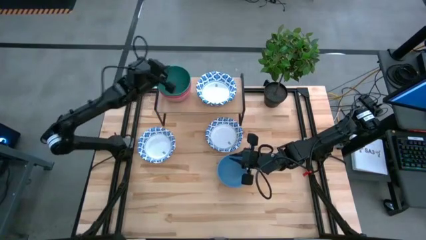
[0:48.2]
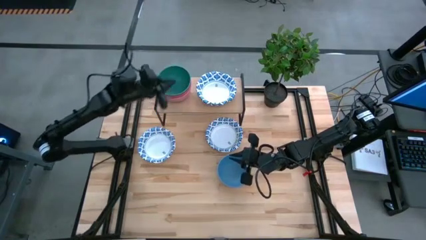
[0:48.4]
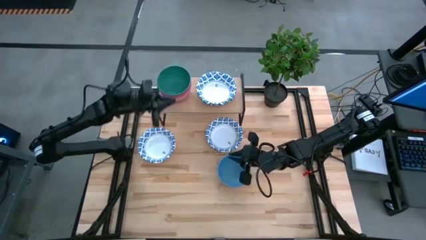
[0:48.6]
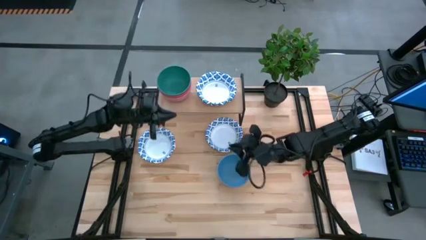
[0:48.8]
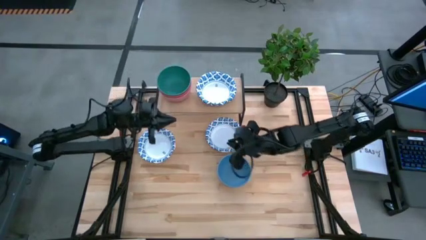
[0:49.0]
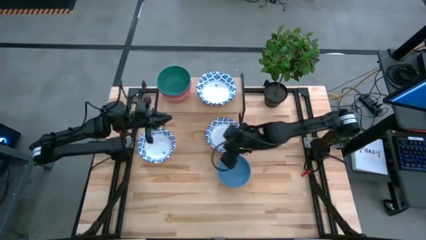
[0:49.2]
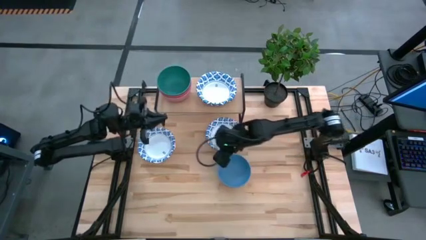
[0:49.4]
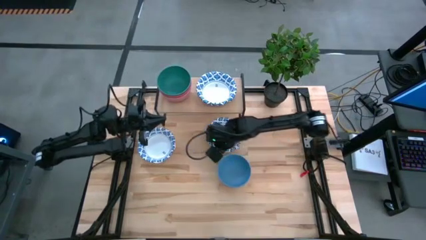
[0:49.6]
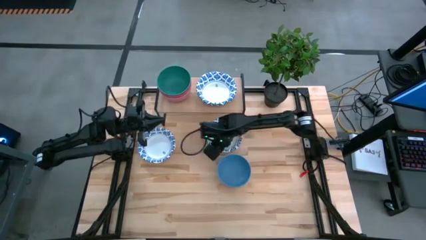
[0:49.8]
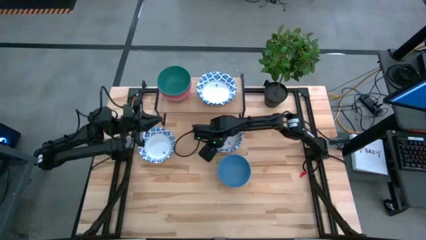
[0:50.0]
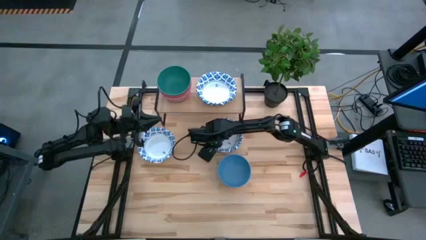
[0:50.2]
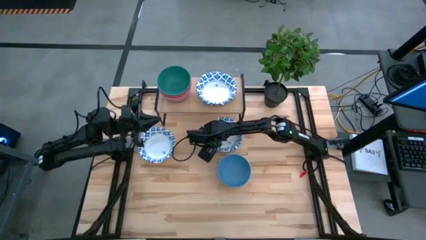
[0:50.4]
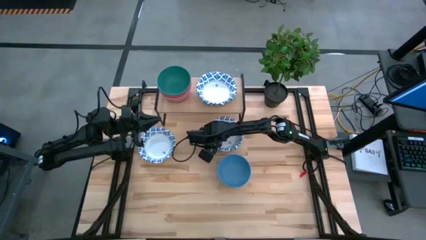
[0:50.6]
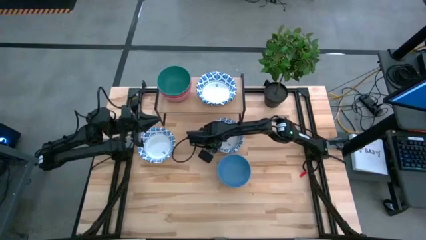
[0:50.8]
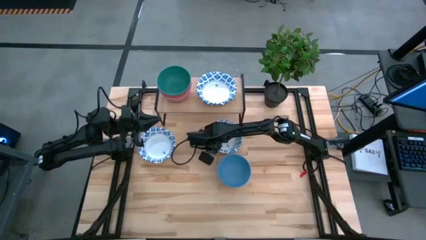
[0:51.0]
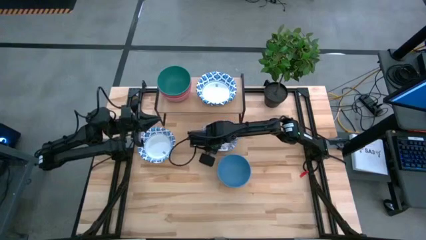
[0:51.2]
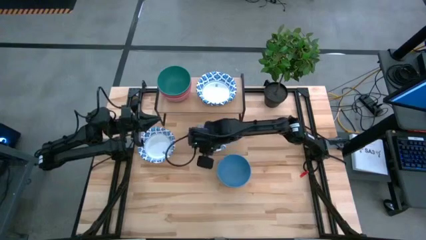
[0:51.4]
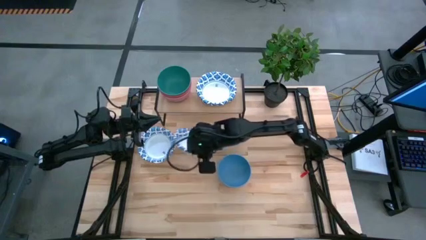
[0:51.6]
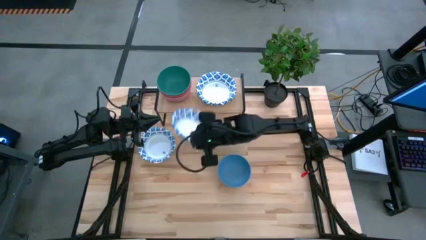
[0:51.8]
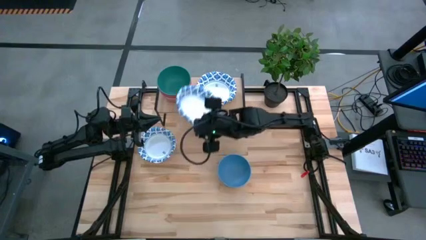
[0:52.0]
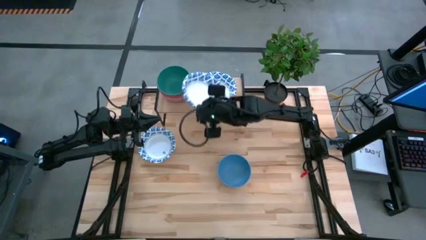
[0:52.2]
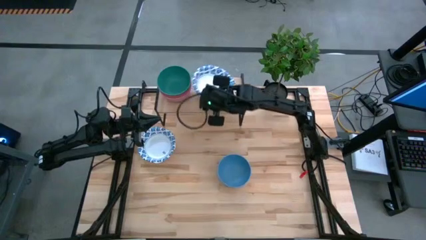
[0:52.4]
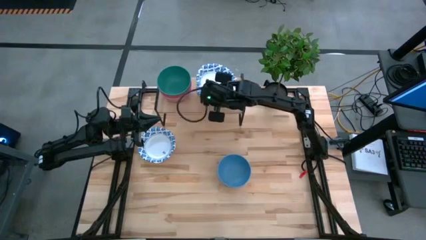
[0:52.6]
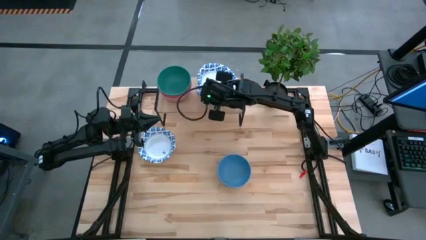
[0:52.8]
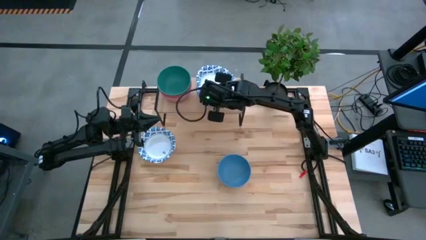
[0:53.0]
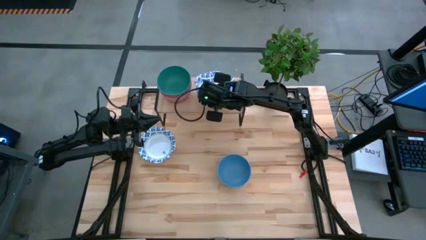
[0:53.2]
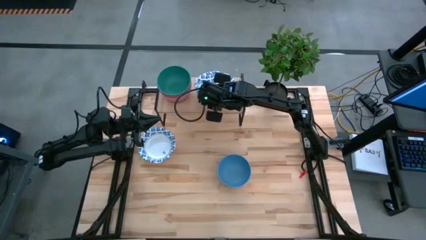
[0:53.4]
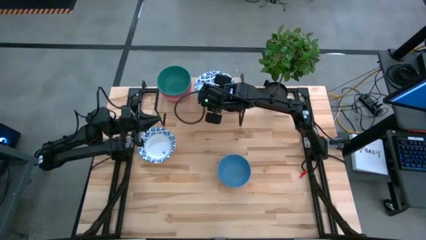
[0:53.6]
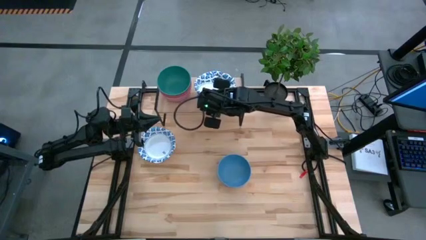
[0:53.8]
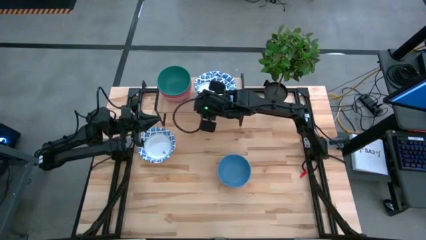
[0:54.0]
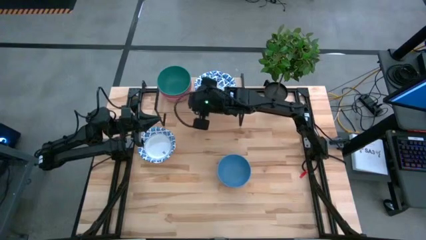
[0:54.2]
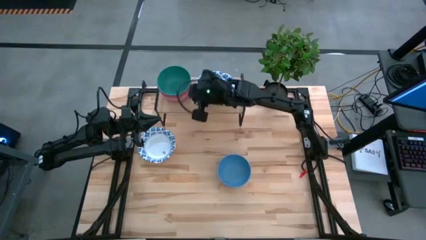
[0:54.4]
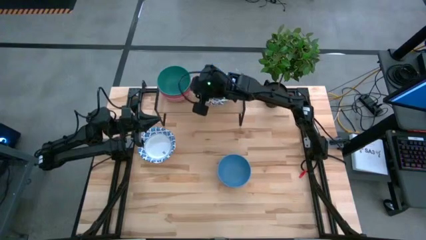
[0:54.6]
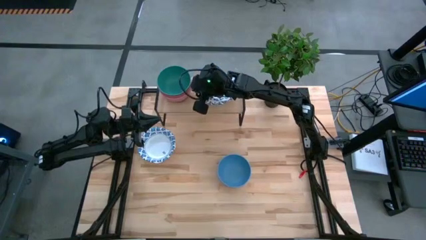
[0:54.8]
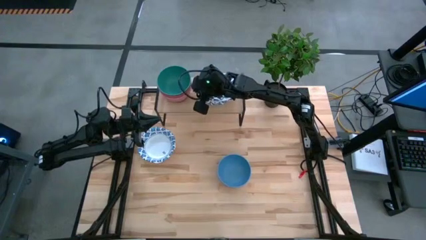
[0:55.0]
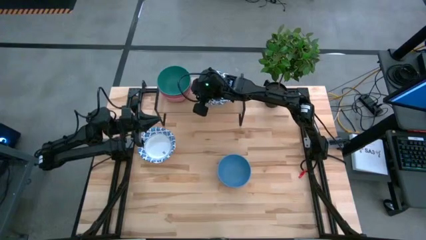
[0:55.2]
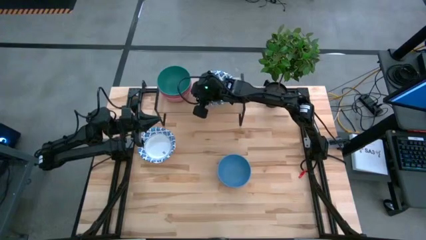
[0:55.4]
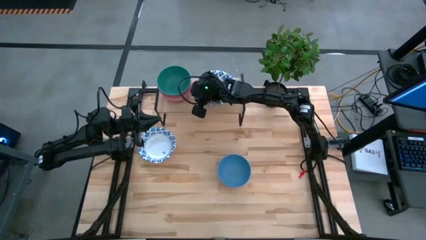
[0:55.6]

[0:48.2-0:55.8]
Task: Place and stack bowls onto a shelf
Stack the right white bowl on the white bowl on the shelf

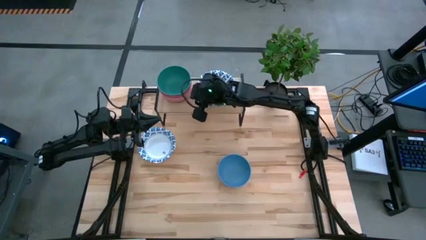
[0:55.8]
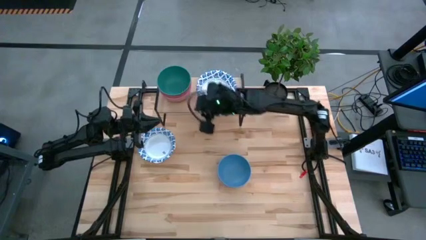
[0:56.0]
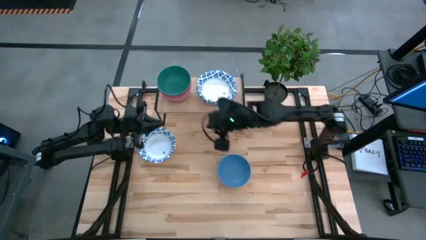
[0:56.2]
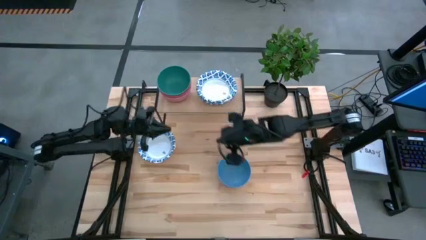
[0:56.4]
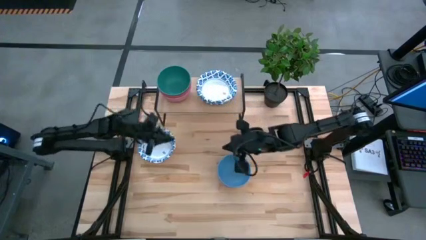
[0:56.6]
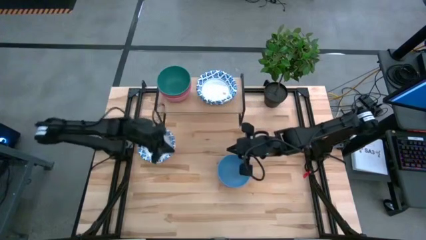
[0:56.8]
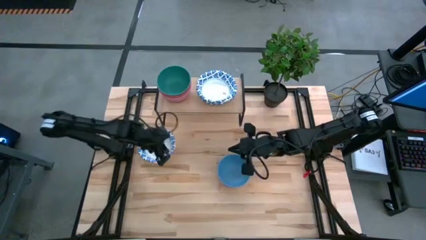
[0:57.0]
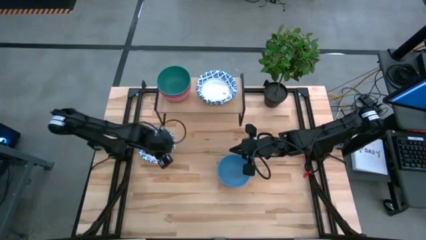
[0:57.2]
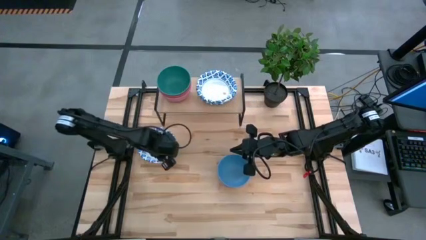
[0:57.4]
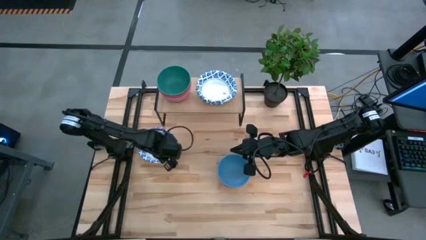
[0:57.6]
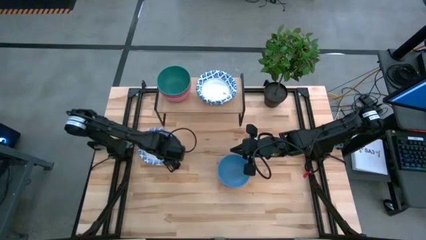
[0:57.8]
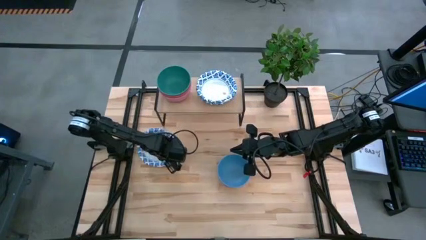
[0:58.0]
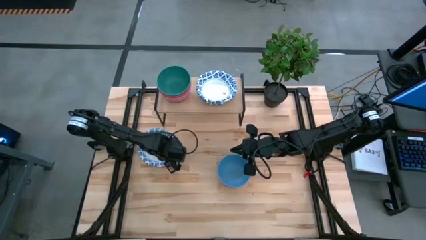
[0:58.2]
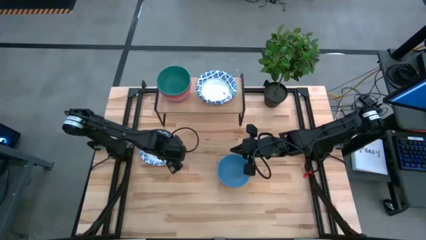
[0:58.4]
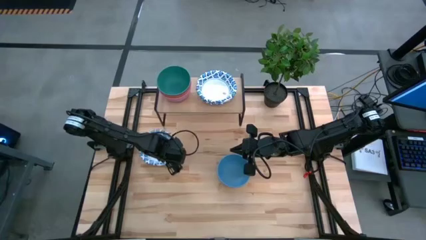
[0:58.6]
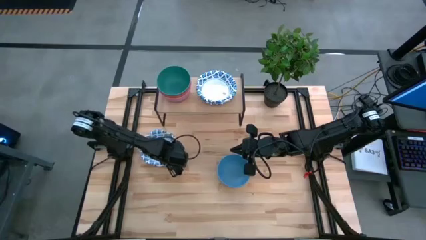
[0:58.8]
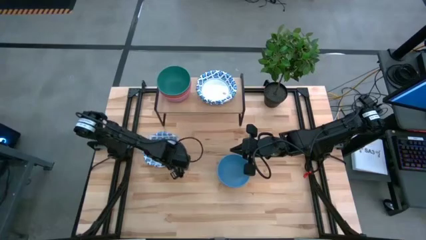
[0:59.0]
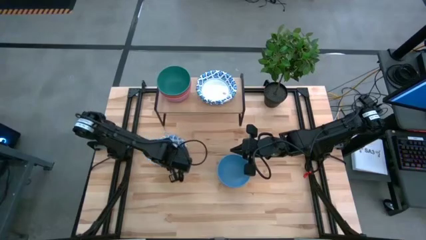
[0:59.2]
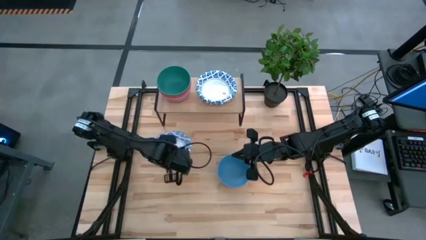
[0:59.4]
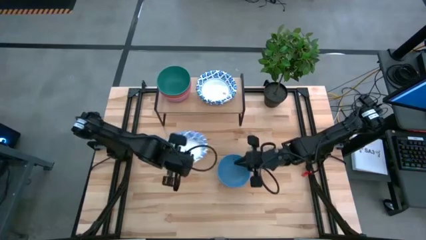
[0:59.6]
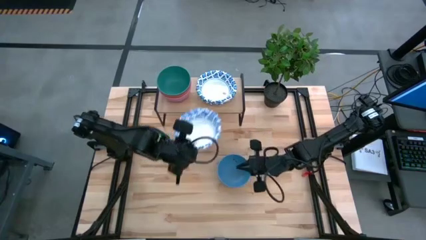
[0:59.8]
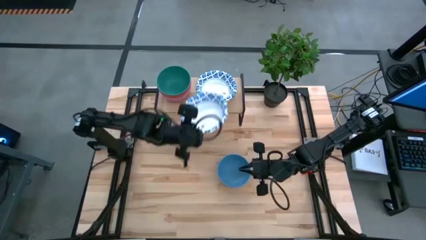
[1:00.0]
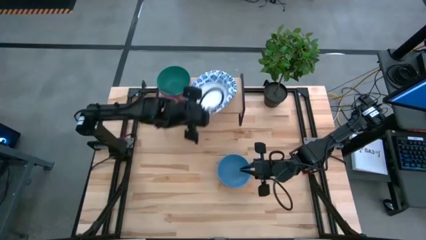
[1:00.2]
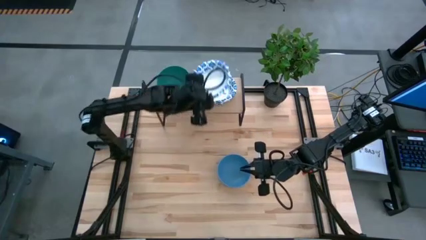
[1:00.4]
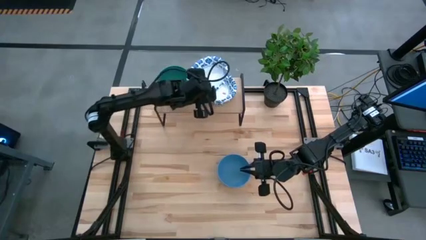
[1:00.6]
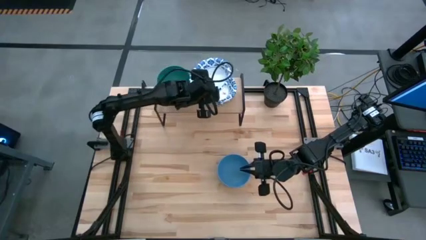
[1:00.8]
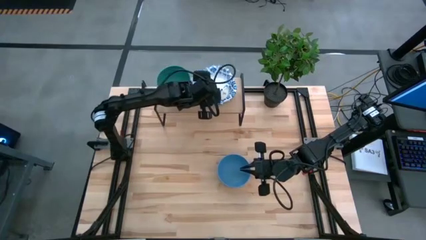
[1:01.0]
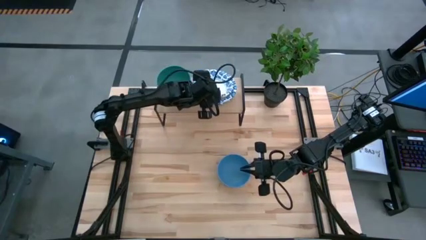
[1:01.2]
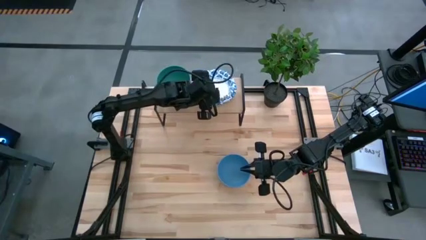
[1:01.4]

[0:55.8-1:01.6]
Stack the right white bowl on the white bowl on the shelf

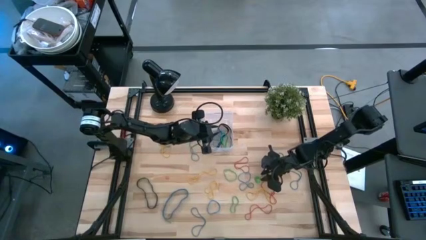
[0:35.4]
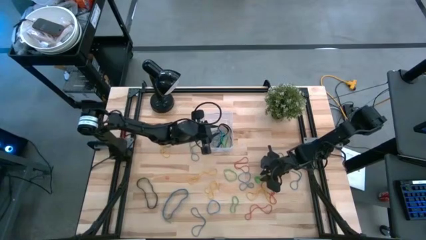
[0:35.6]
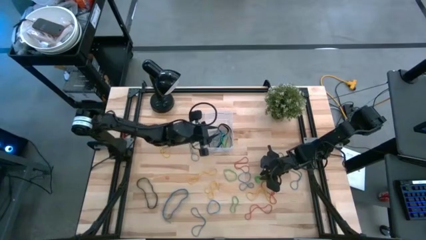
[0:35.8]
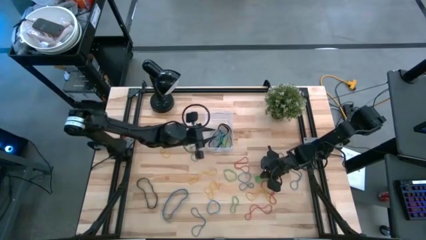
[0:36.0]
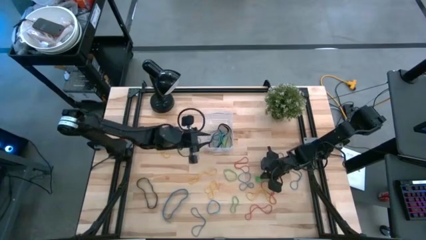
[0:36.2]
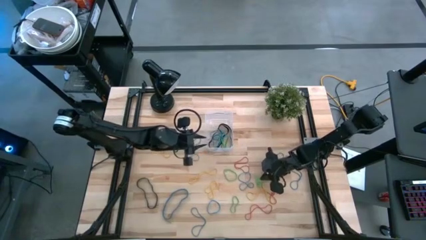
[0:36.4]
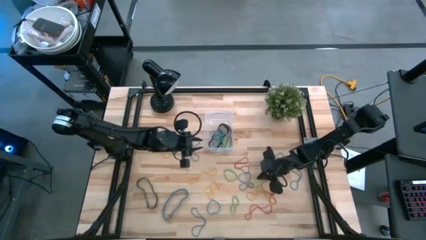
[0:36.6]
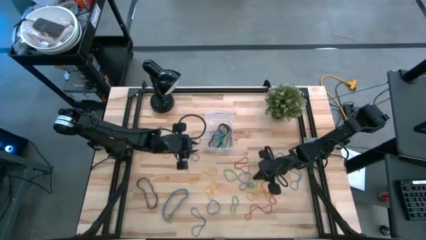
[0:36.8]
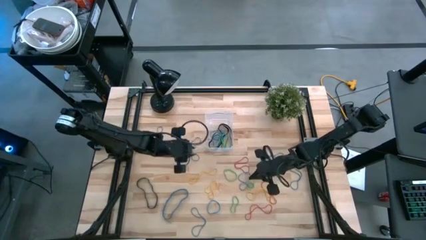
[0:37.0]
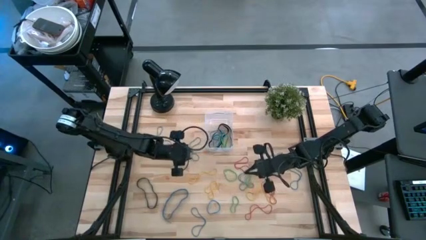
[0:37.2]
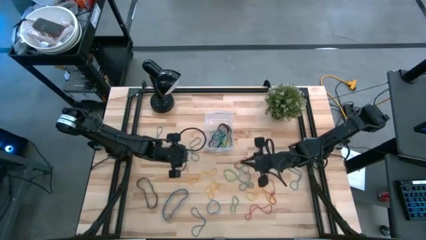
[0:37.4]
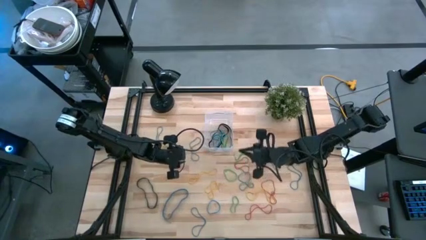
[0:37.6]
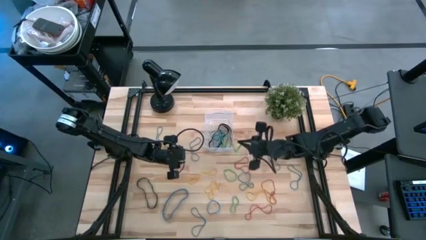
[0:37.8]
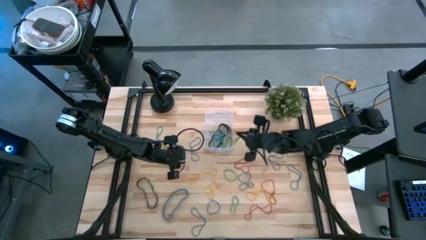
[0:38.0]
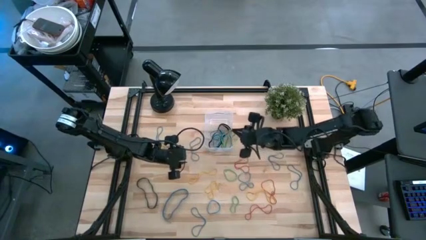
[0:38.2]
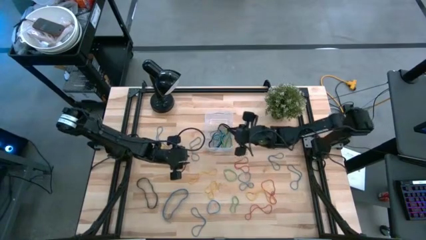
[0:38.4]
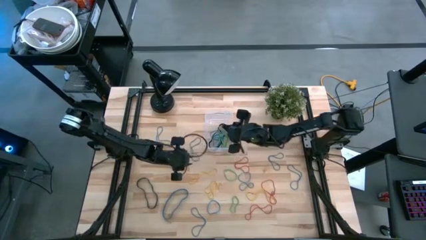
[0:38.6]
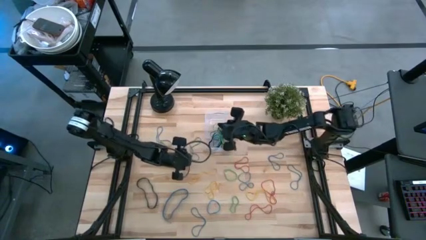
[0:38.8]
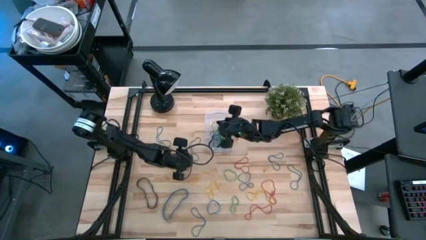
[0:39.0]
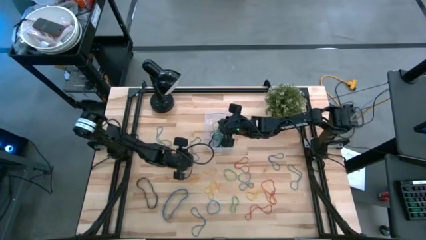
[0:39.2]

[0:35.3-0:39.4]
Task: Pick and place rubber bands into bin
Put green rubberband into the transparent bin
